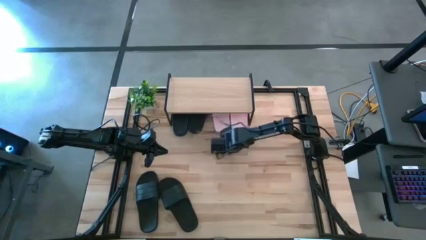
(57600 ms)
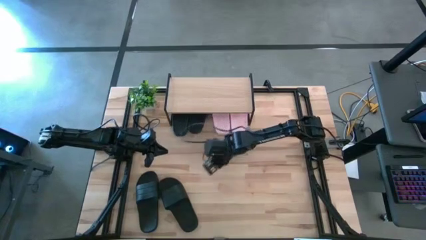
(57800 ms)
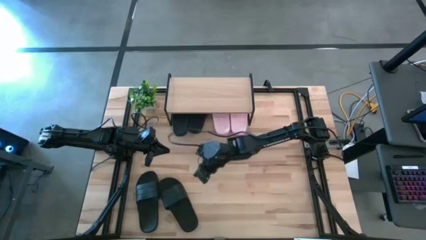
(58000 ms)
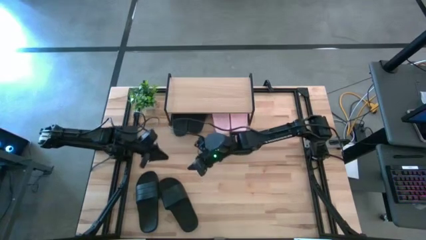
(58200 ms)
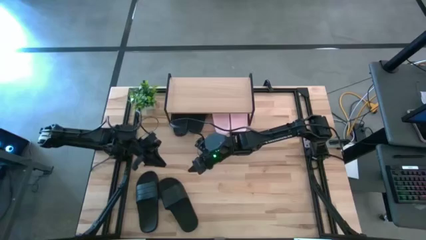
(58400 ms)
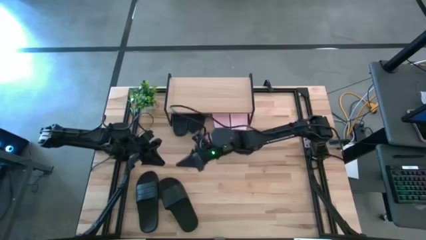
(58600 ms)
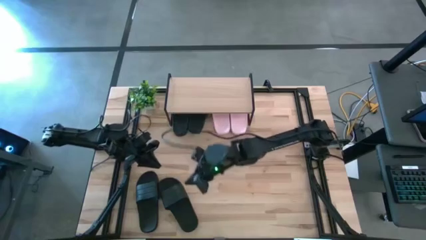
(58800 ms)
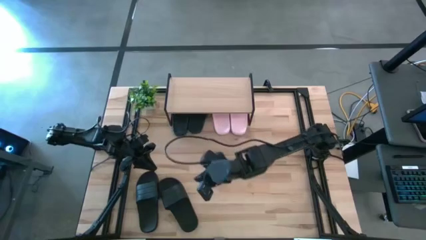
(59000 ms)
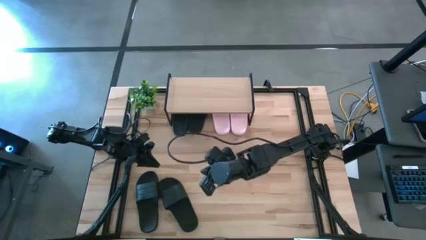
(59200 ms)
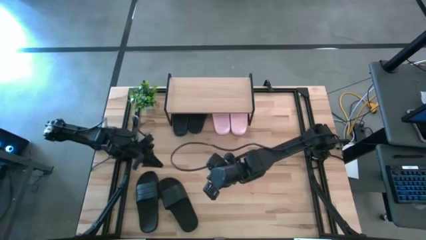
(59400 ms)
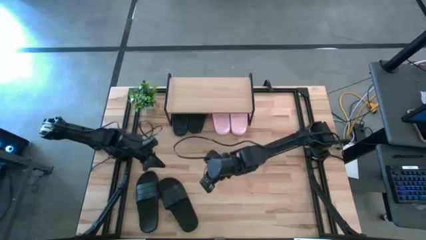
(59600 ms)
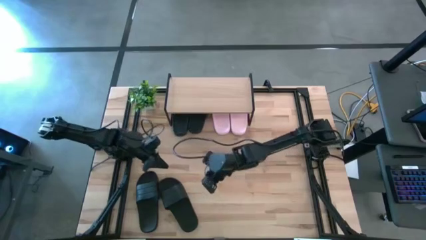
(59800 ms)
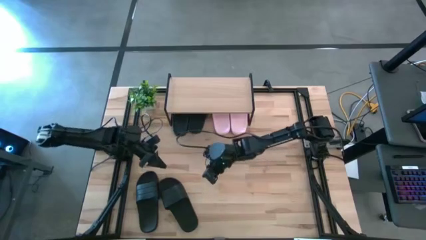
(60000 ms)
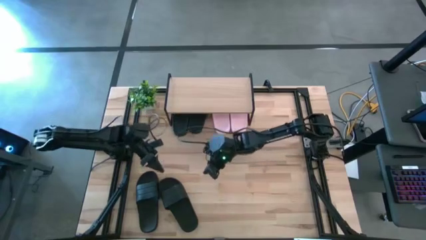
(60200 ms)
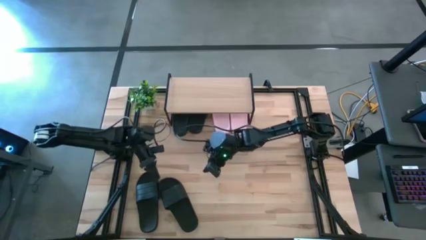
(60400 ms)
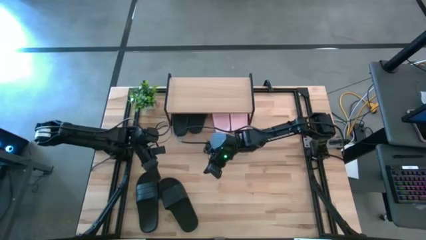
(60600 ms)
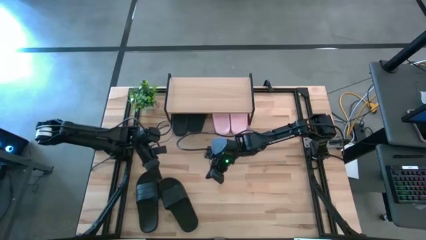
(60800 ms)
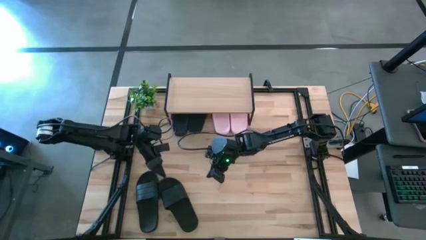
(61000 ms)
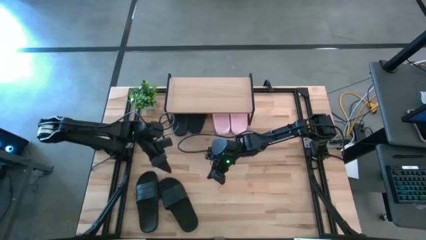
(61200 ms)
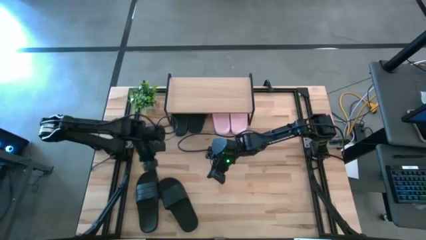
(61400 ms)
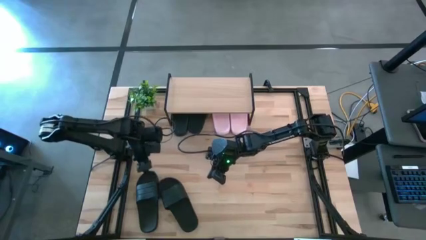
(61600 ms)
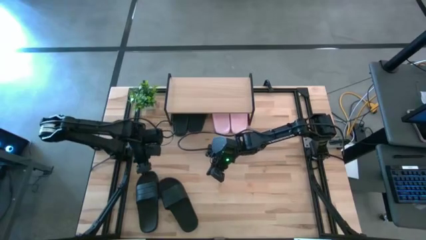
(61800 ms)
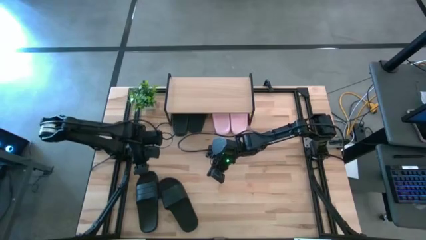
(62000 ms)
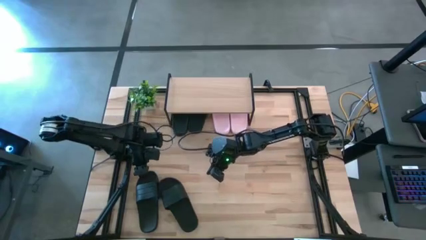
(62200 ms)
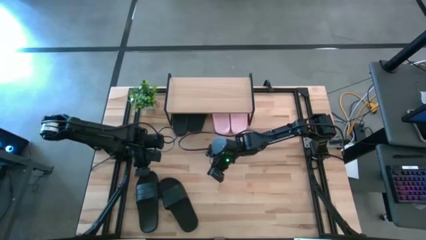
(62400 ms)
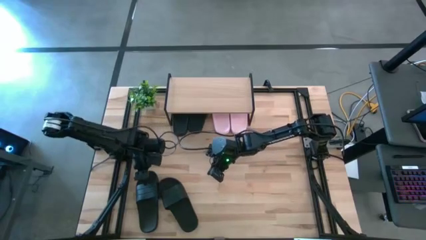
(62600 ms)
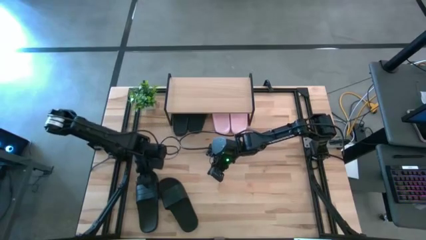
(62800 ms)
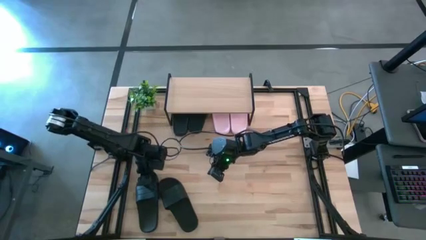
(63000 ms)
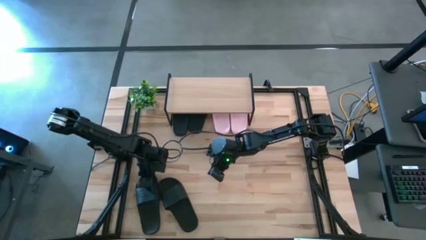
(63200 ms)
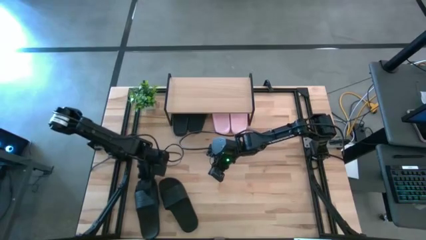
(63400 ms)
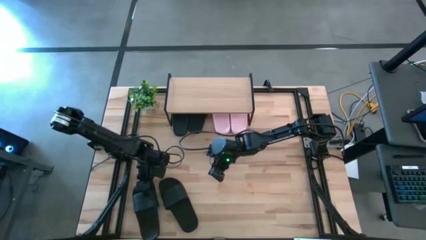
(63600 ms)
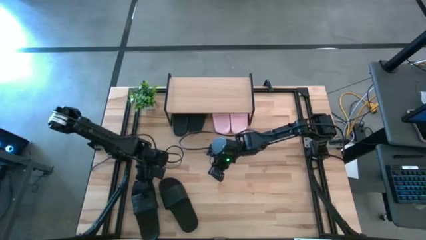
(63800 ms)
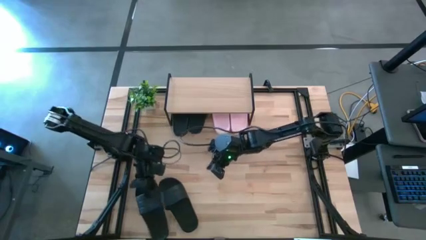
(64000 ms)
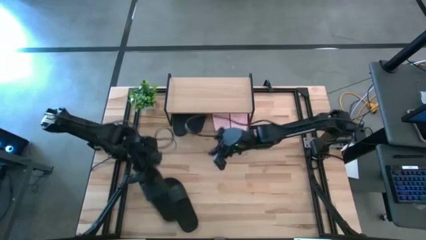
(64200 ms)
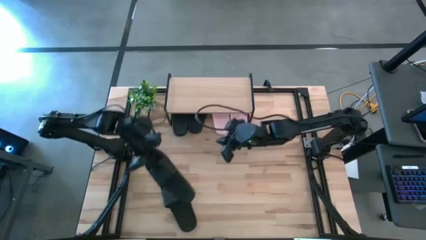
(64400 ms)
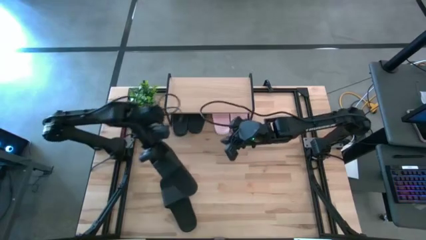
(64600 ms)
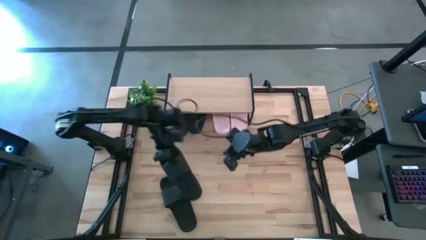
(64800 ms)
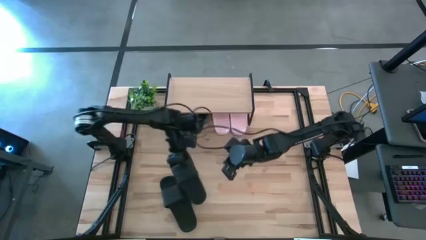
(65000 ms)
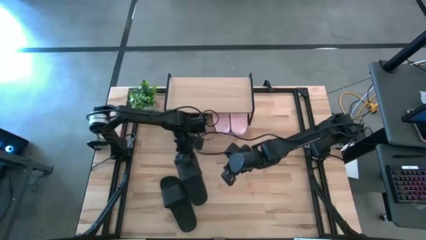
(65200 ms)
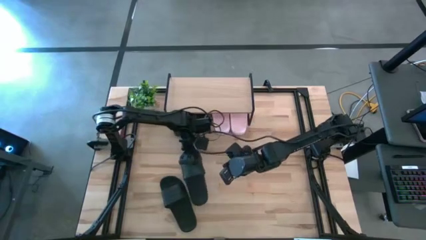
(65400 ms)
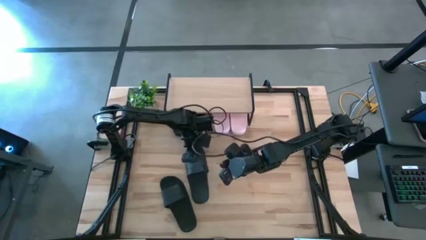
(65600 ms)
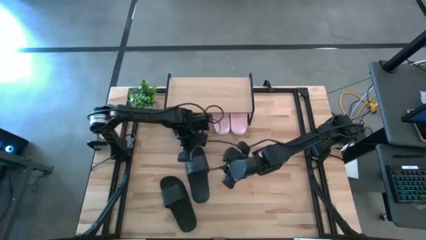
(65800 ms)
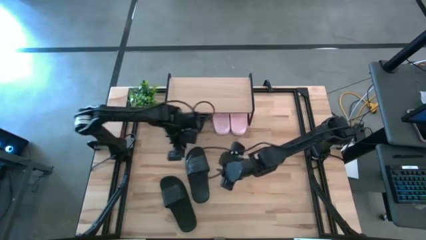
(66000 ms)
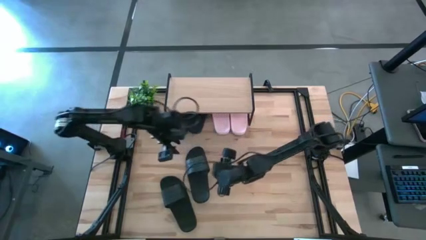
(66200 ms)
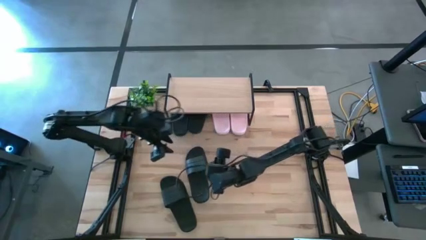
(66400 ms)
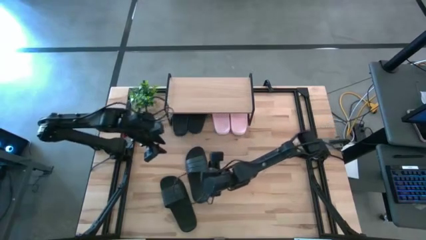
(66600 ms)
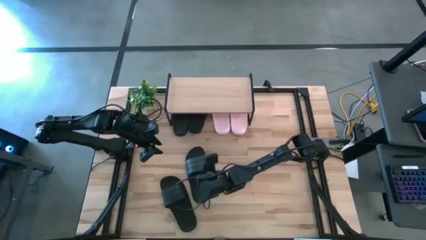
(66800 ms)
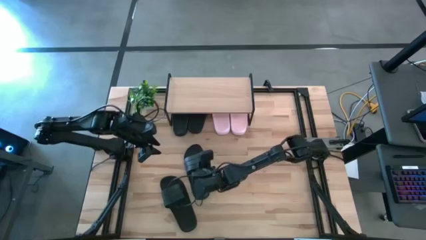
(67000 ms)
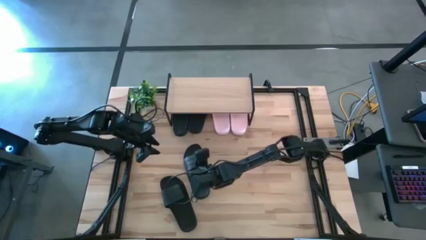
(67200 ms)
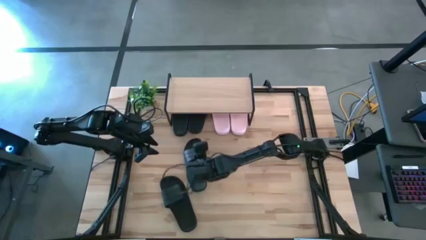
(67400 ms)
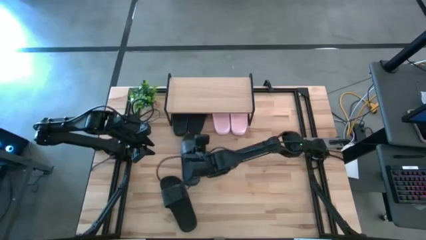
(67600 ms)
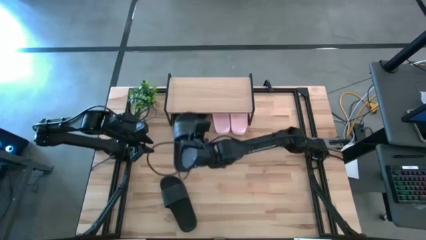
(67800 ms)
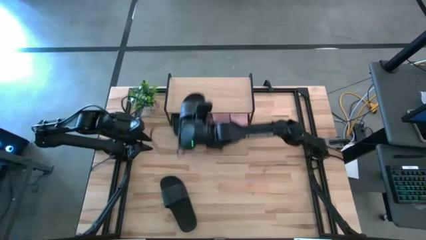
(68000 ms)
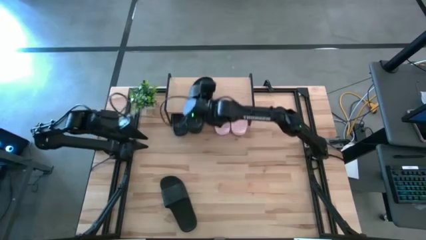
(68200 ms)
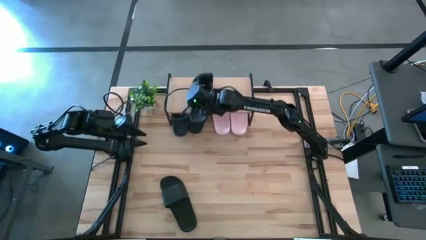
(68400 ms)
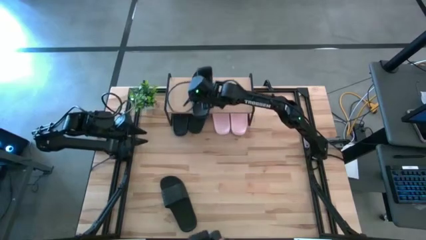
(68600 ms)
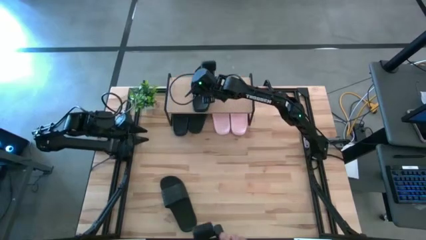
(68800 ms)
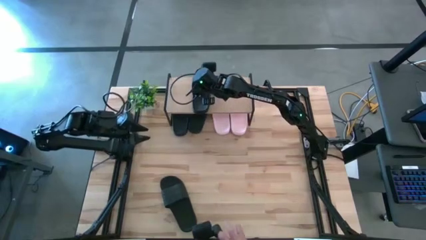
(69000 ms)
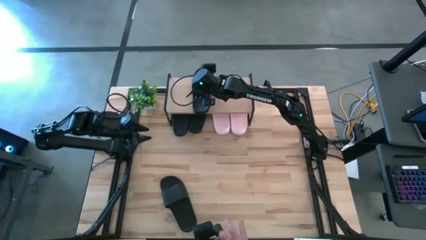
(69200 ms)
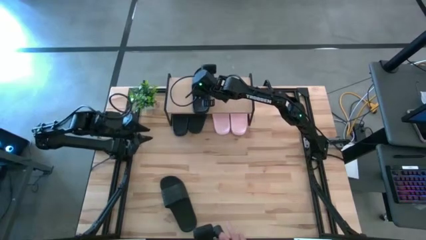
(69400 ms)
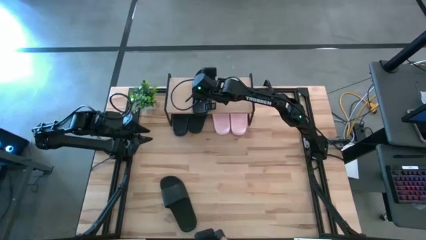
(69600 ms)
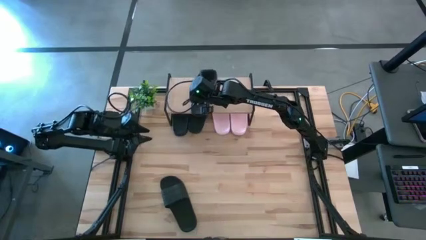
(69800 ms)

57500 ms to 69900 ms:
Task: Pick and place slides into the shelf
Put the black slipper on the shelf
